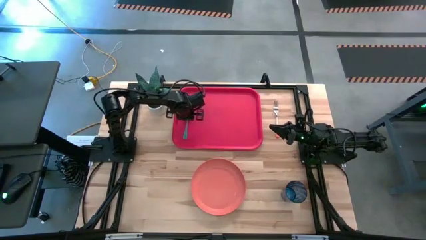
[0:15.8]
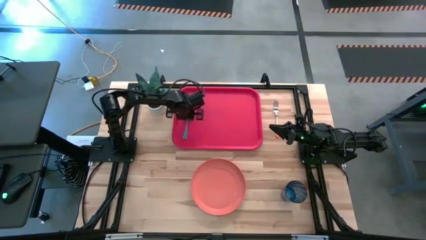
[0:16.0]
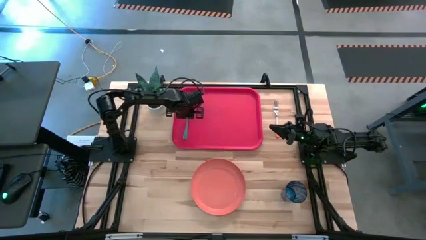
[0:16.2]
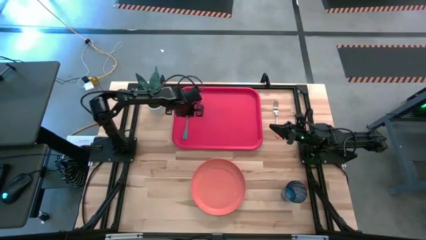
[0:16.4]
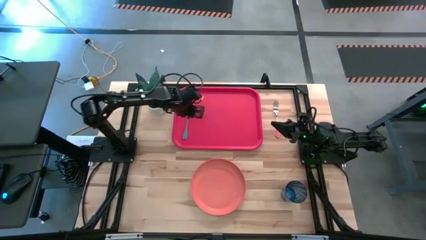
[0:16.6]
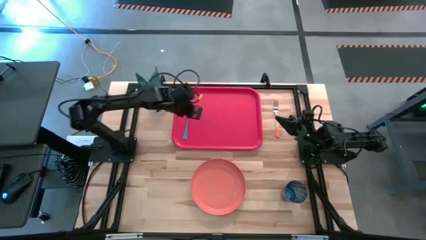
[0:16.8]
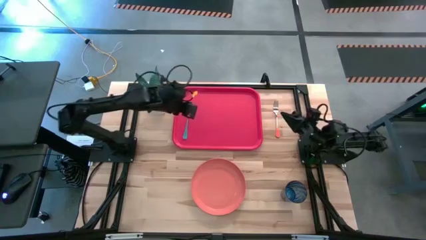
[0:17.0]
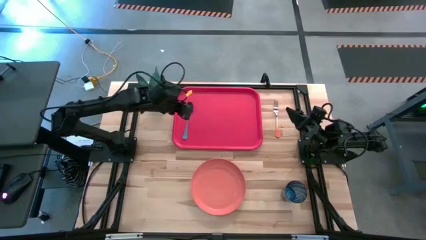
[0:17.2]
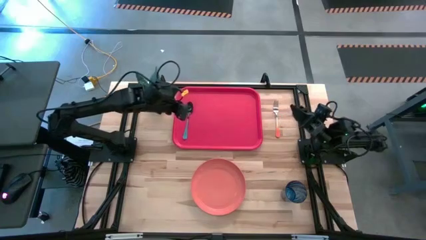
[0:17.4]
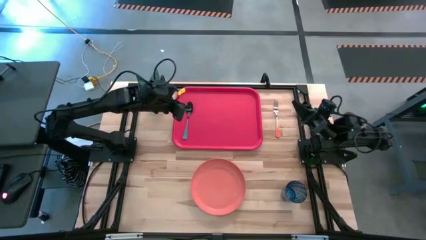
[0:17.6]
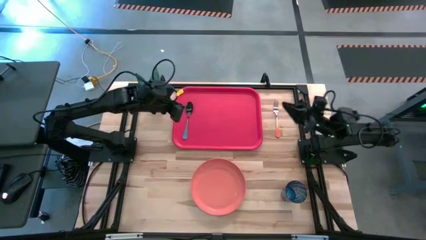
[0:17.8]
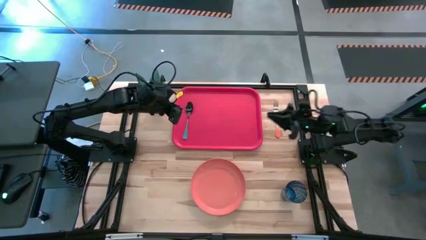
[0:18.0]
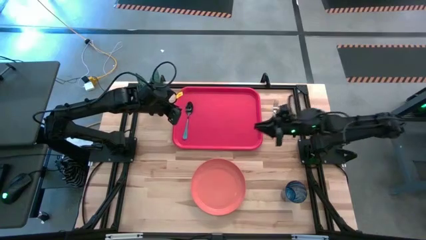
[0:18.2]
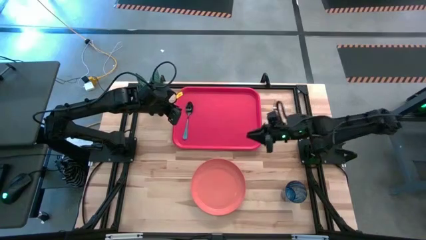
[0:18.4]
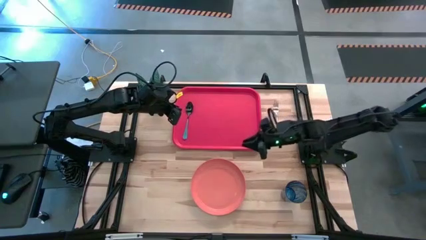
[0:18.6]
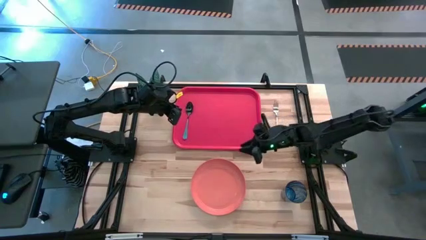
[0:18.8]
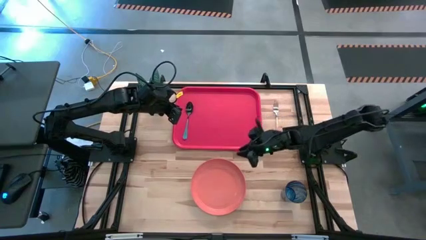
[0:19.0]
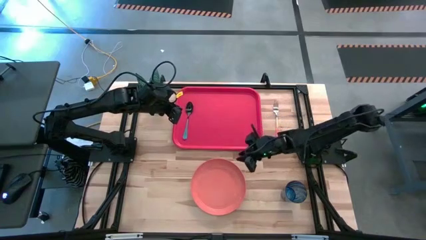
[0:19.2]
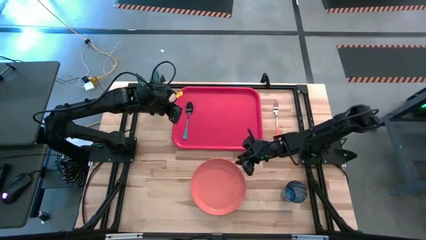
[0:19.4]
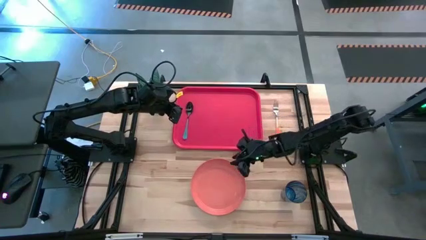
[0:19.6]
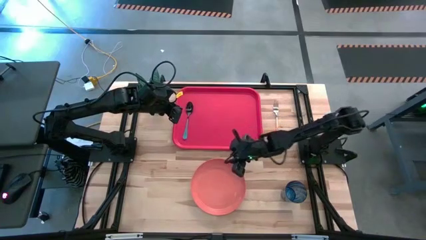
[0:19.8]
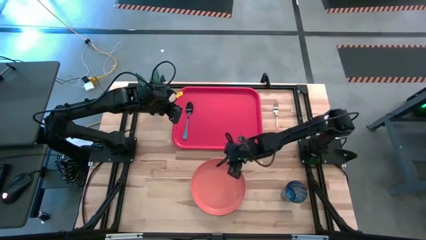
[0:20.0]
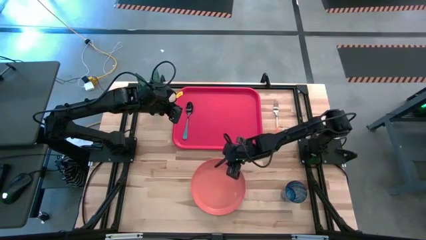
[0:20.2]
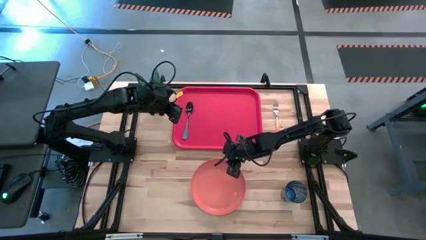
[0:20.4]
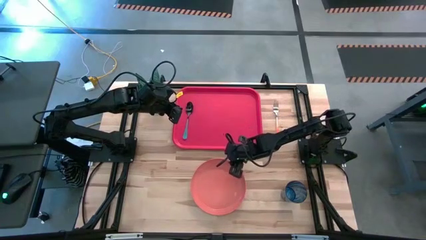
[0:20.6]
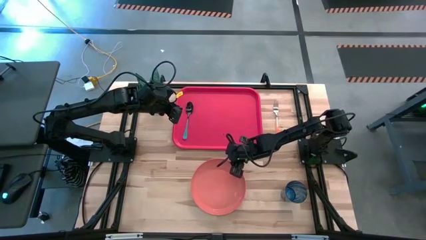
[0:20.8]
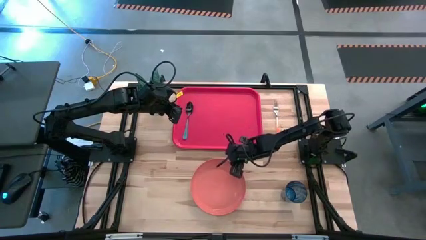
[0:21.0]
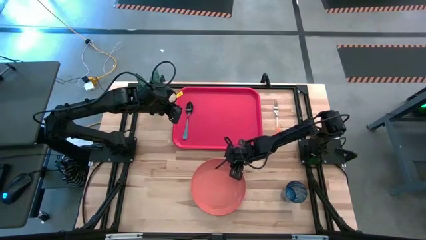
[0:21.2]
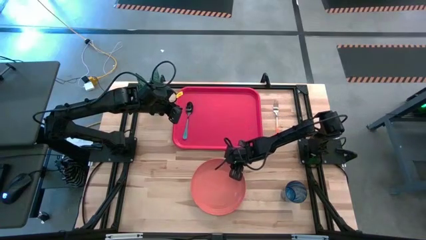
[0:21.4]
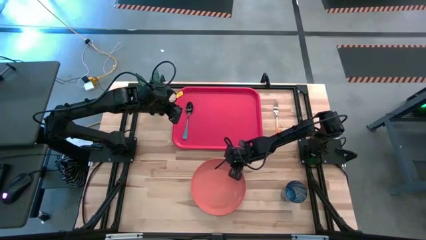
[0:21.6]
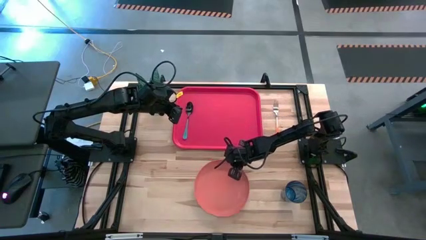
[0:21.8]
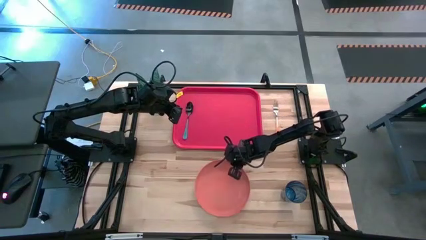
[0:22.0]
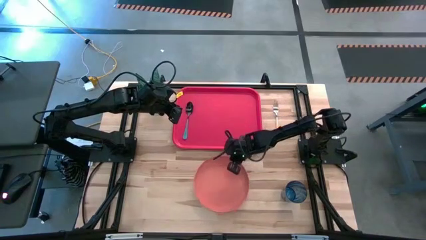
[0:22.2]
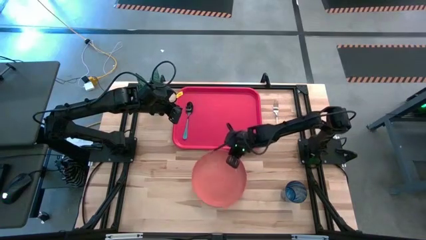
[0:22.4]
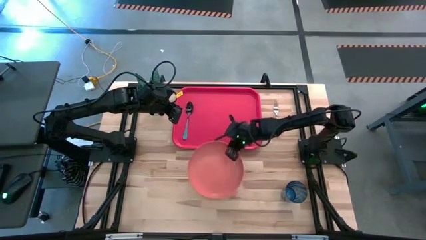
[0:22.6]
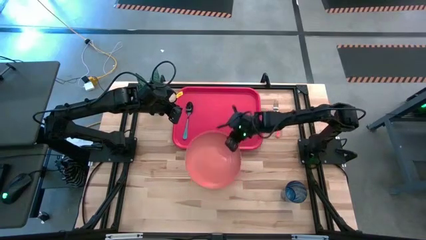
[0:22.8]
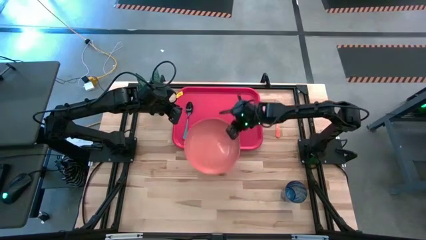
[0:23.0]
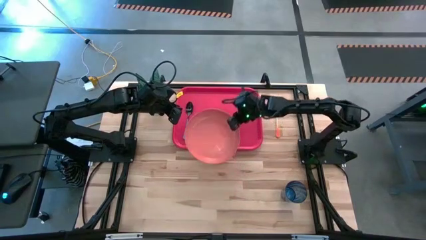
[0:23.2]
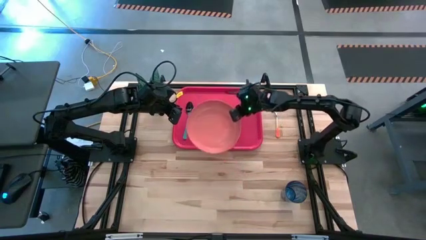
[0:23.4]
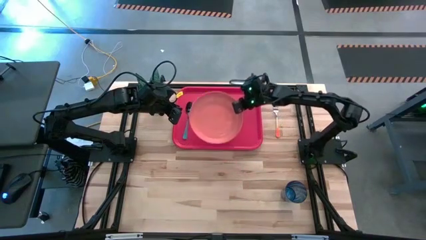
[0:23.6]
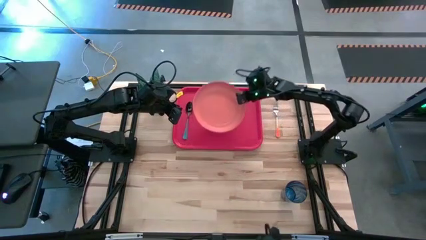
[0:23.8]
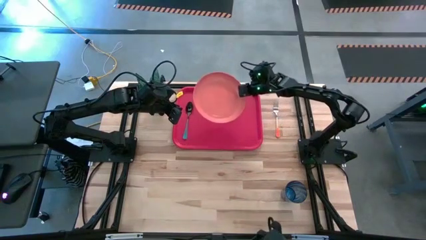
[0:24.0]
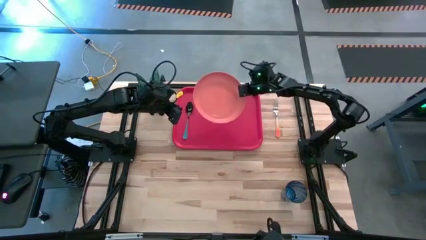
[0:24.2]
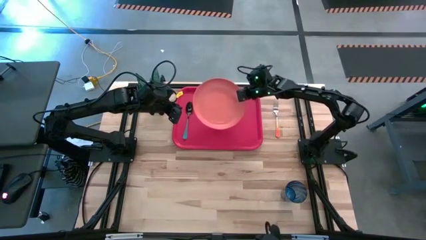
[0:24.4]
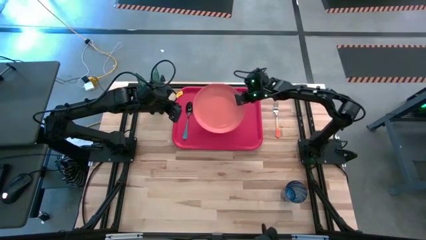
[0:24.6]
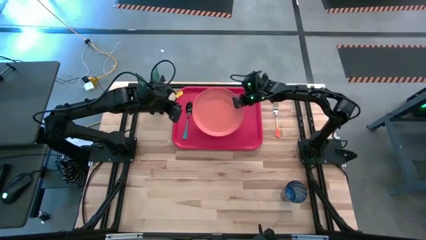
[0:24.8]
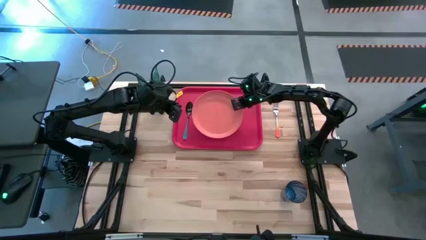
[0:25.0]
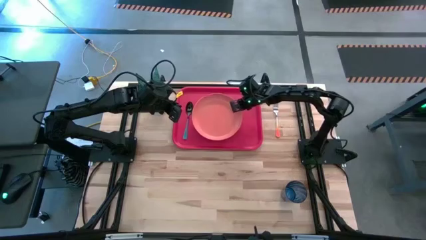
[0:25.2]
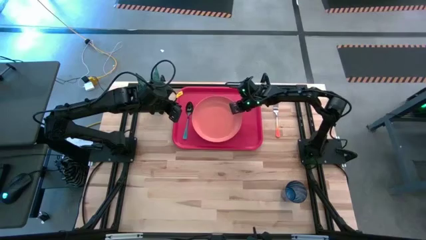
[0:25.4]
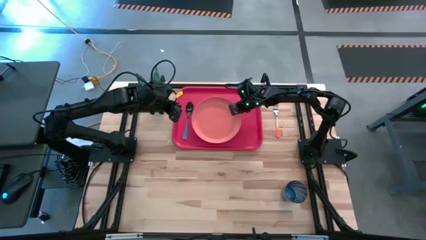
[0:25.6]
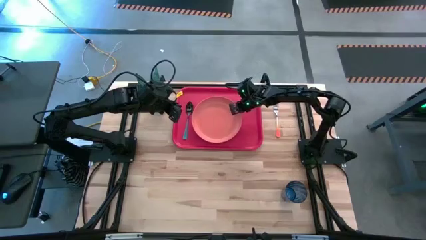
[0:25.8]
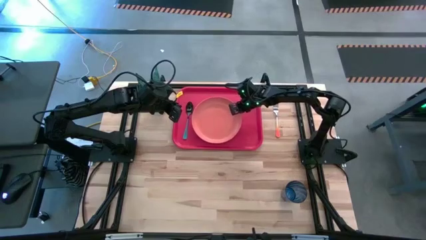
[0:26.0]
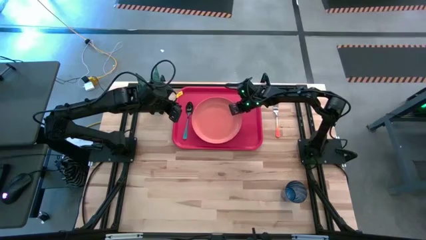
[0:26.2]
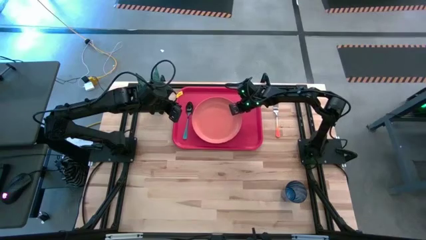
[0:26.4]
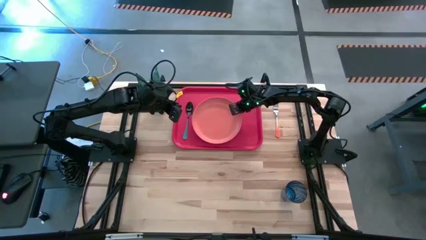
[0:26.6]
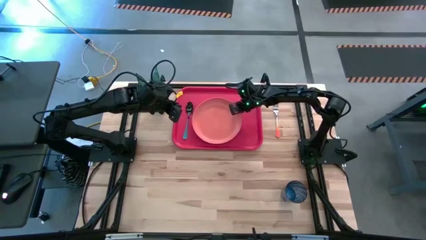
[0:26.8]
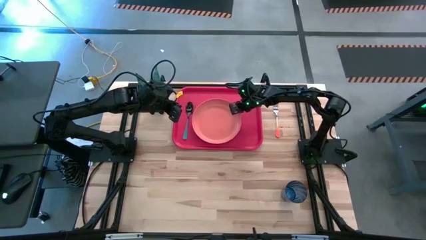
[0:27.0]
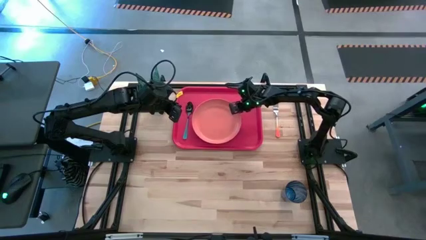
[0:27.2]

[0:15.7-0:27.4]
Task: Pick and place plate/cup/fork/spoon on tray
Put the orange plate on top of the pink tray

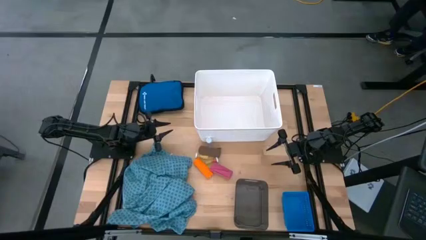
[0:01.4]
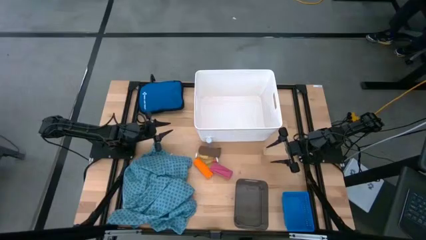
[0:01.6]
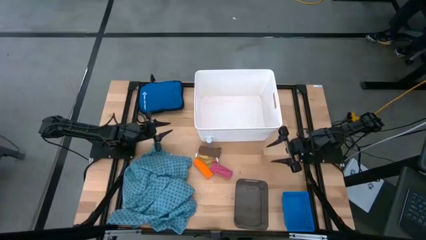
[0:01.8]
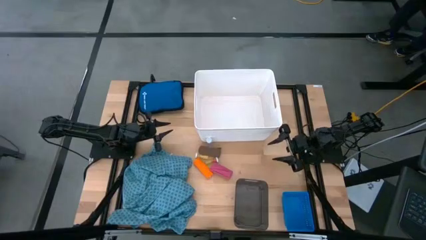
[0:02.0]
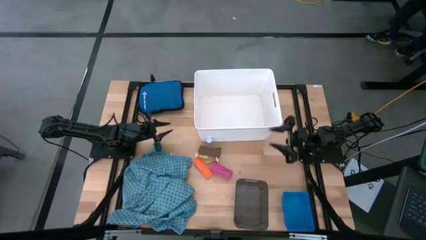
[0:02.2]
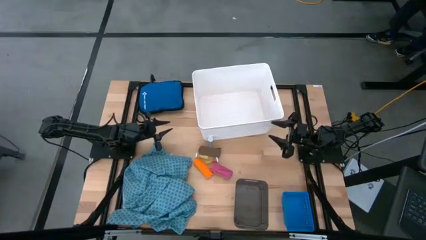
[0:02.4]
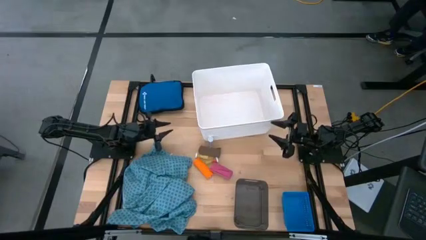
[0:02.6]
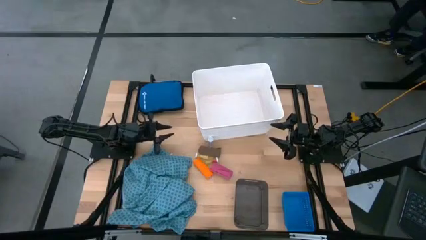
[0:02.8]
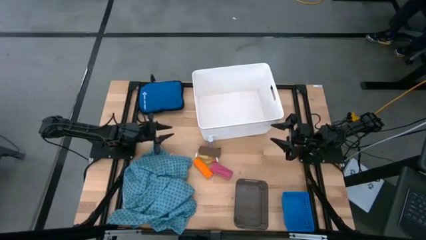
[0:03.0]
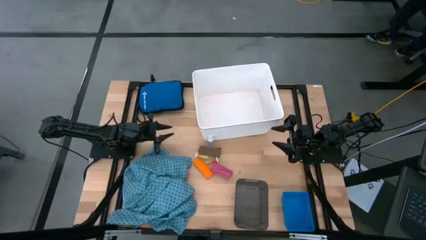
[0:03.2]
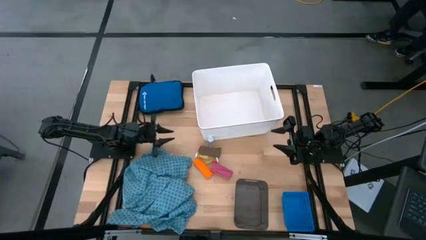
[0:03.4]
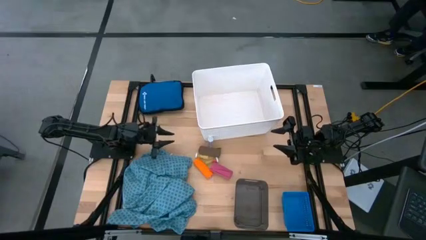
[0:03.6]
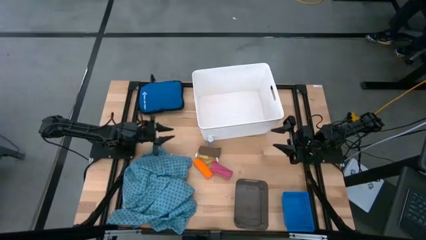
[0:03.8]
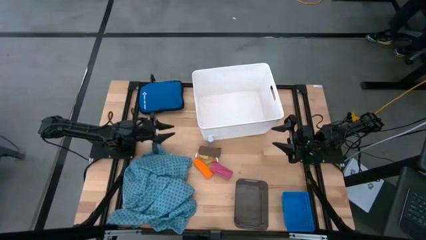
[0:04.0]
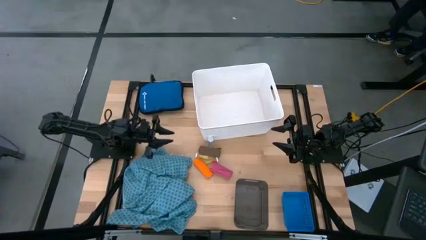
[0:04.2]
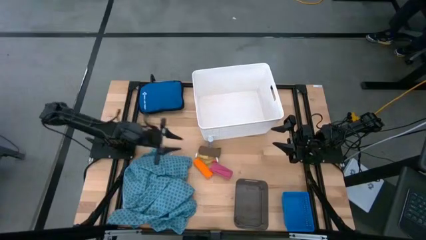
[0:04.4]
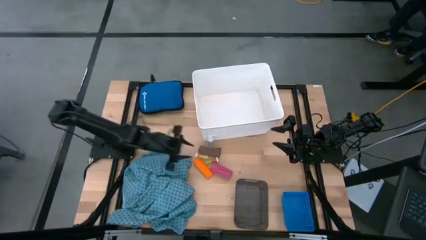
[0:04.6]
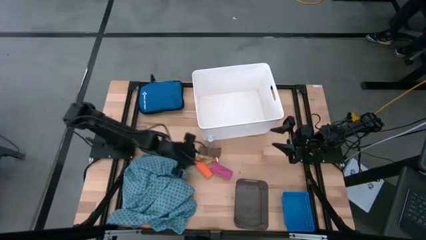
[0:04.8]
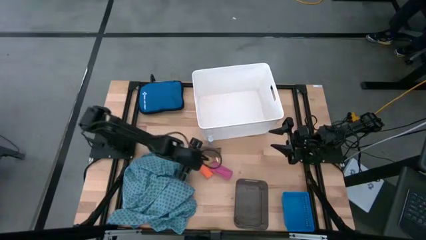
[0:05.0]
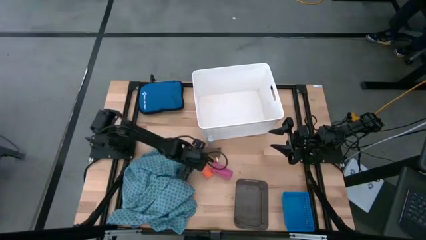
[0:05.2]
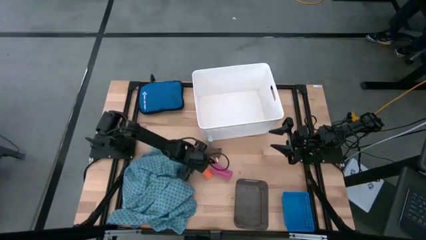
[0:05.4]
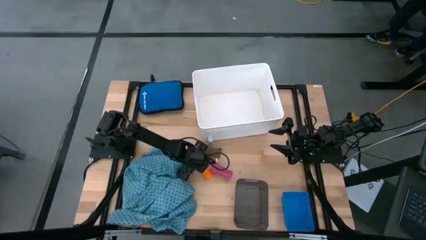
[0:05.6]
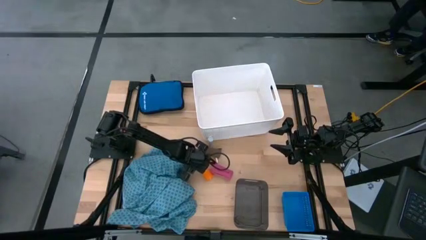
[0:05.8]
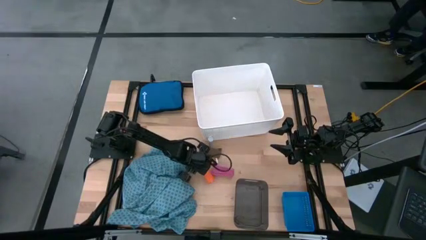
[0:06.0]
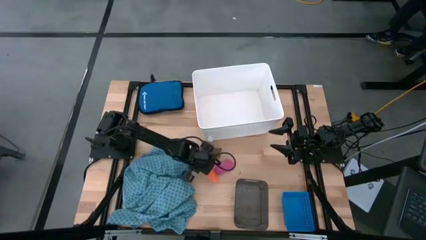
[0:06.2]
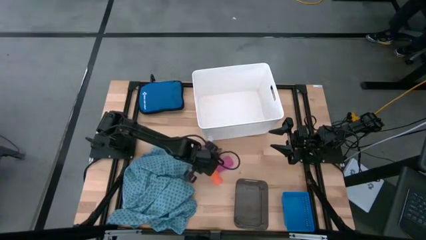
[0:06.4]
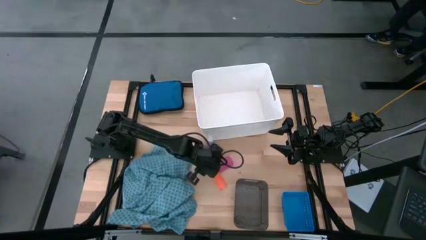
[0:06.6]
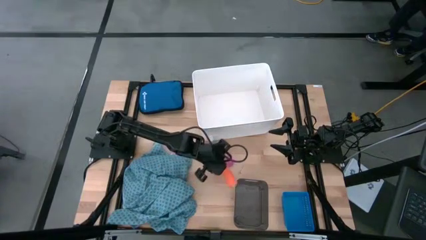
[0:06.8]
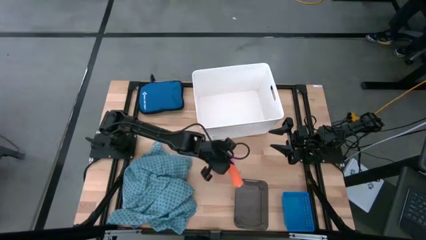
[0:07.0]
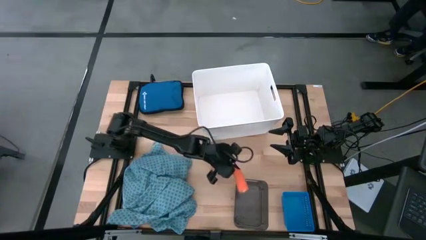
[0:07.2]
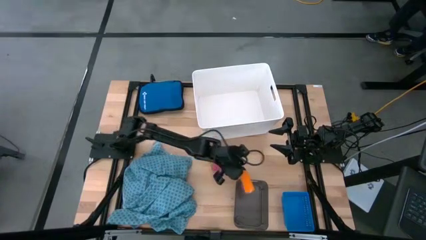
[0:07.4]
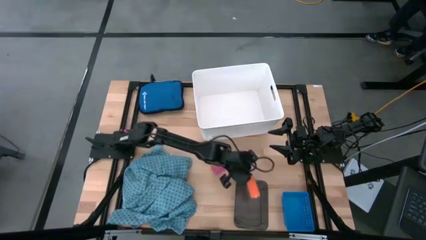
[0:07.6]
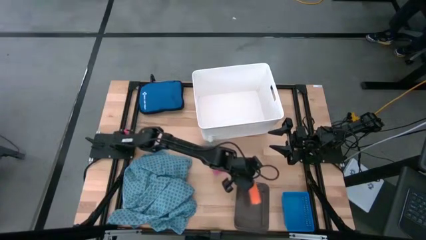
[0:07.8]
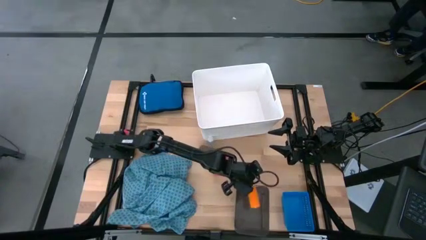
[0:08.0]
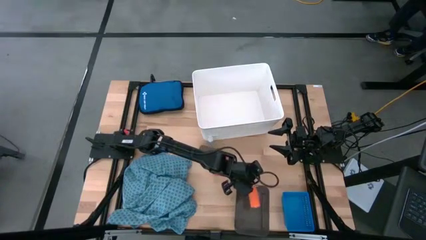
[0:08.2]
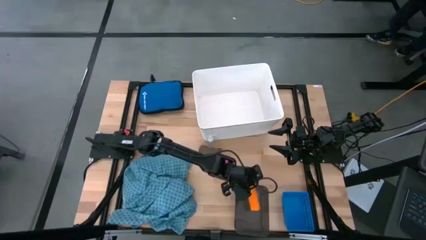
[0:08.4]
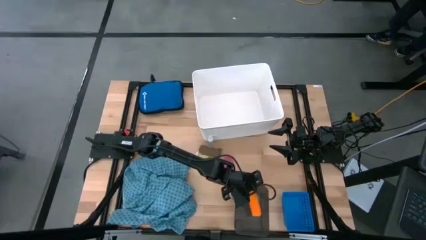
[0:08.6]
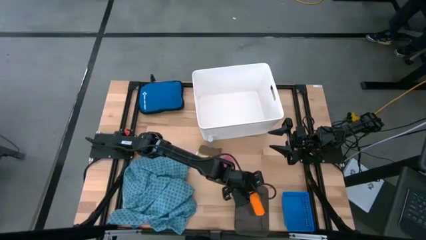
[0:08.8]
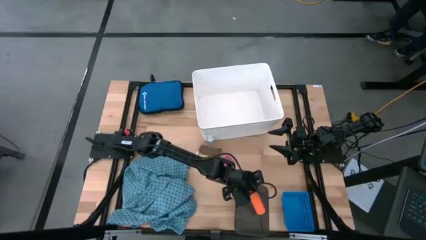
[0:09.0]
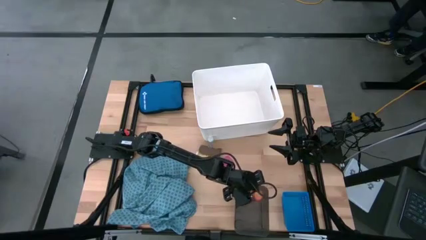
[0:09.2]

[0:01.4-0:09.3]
Task: Pick & place medical supplies in basket/bin
Put the orange bandage into the black bin
